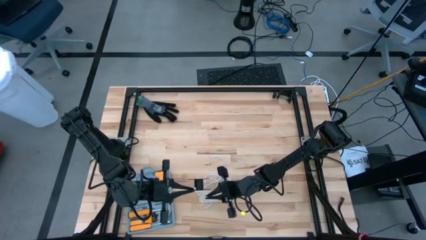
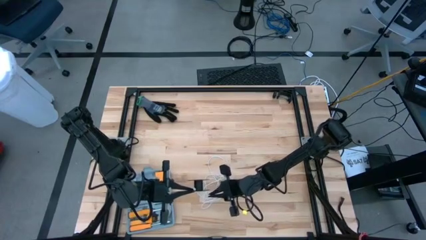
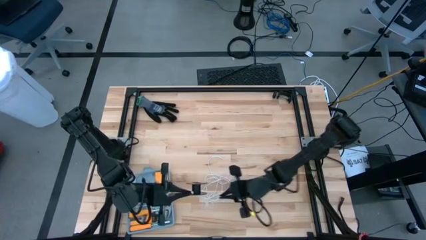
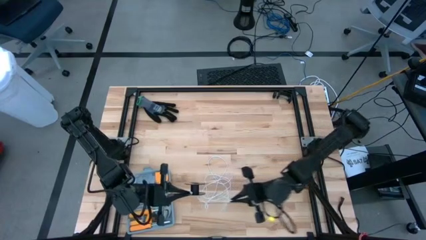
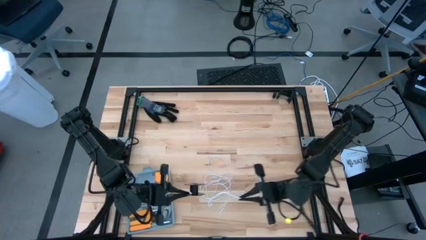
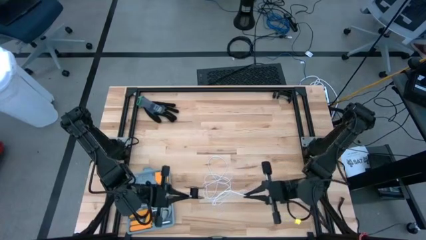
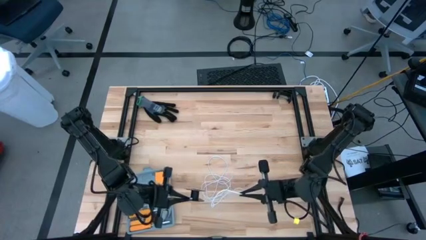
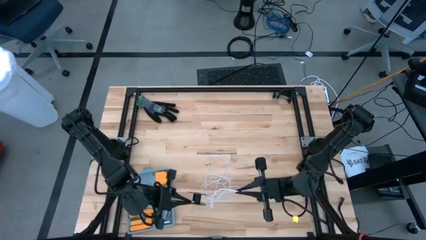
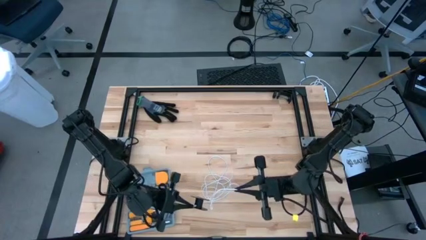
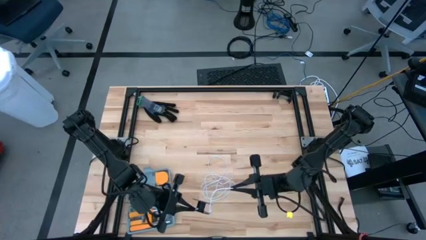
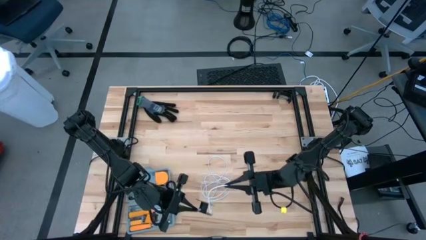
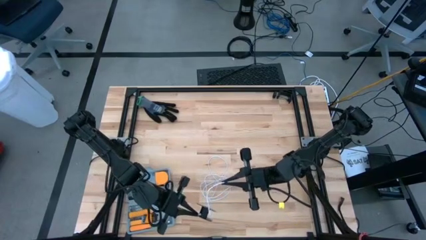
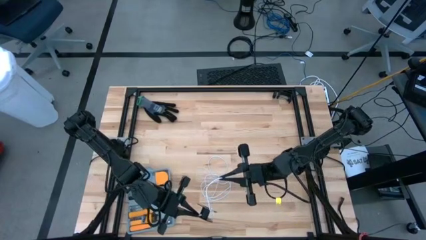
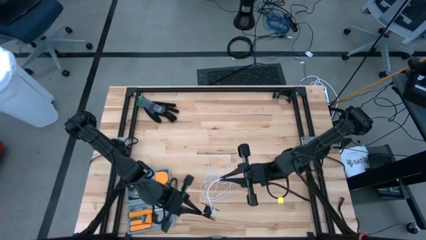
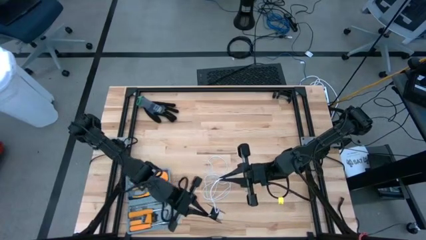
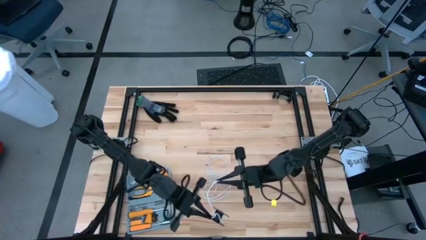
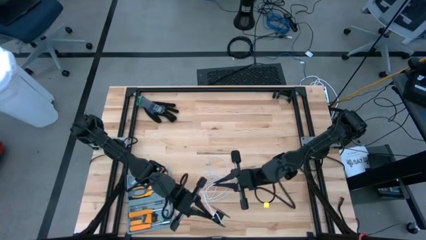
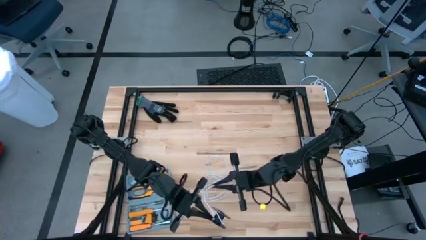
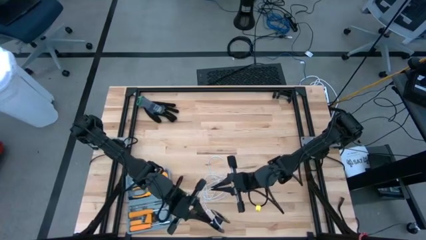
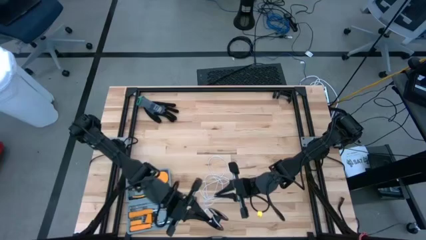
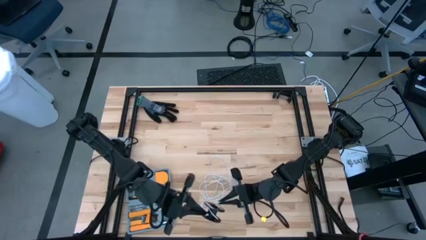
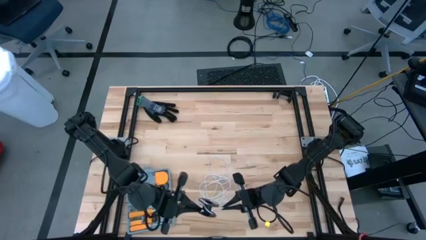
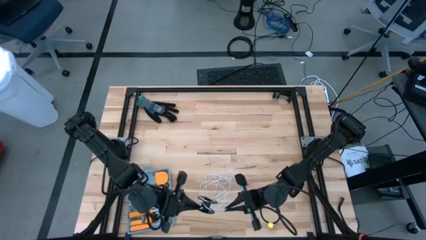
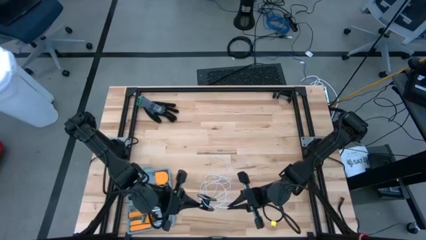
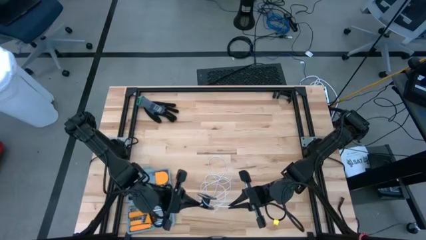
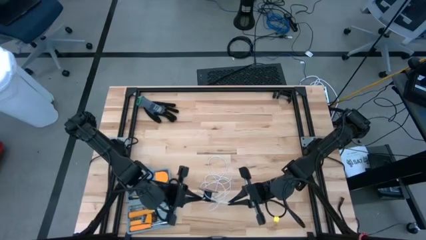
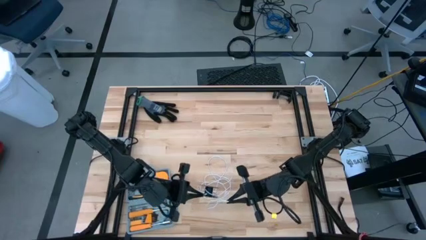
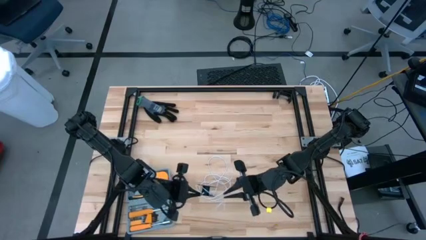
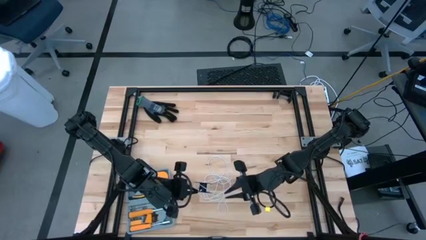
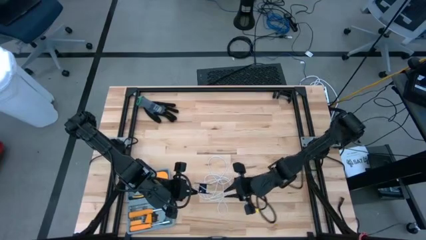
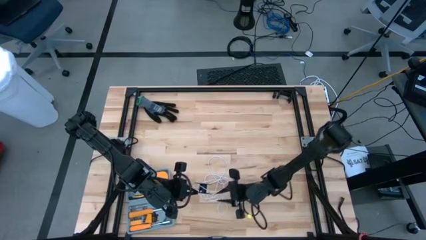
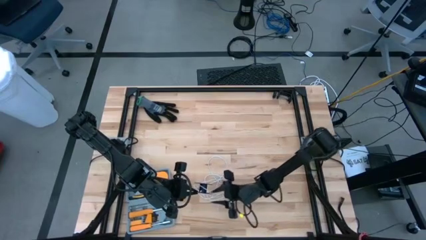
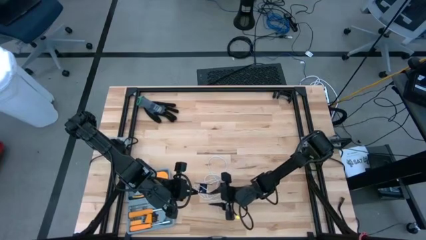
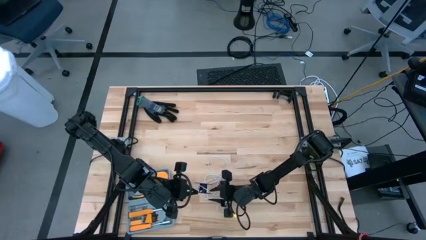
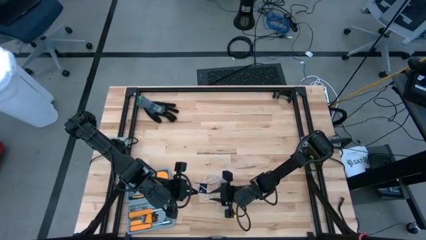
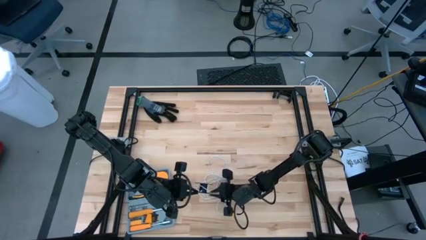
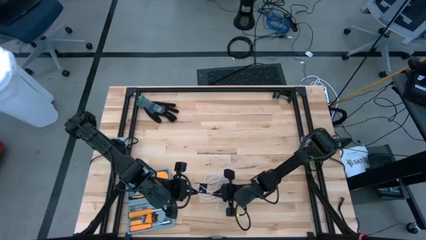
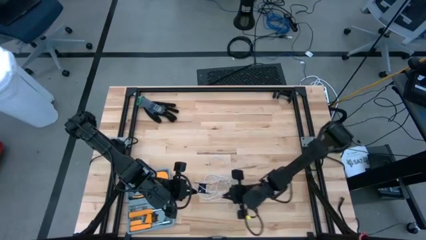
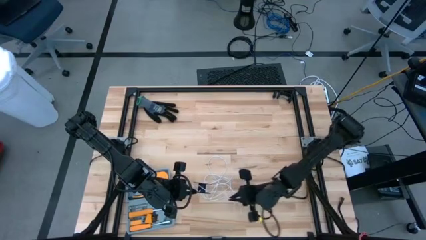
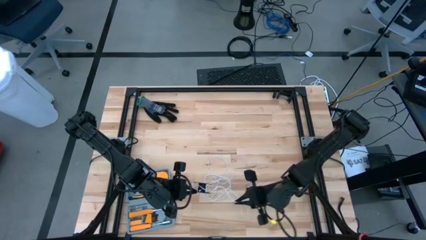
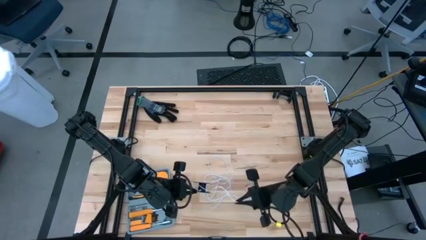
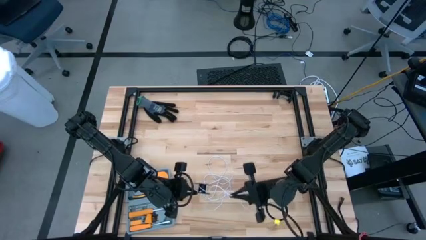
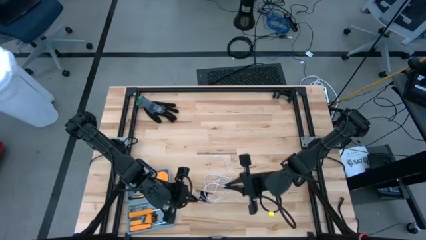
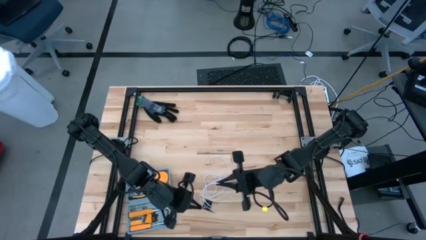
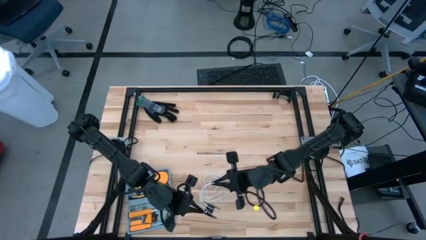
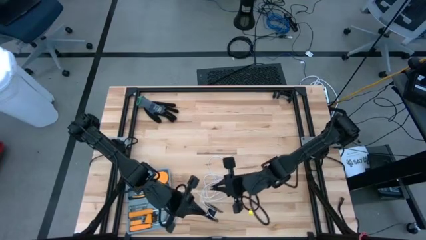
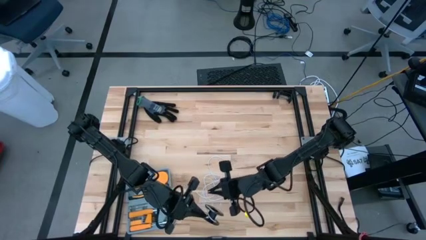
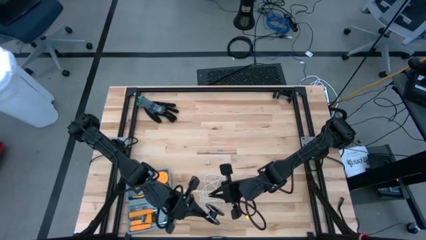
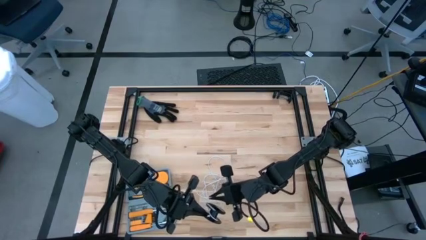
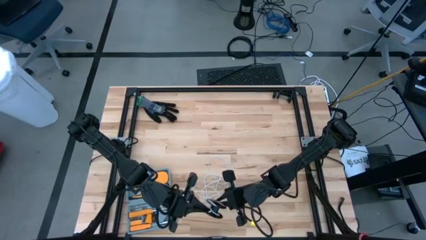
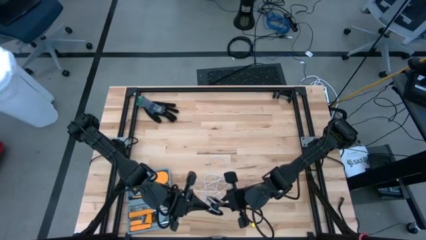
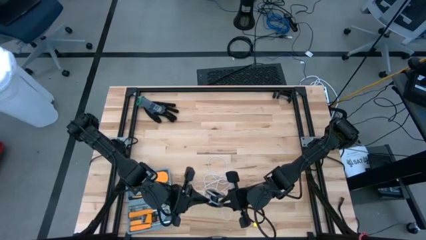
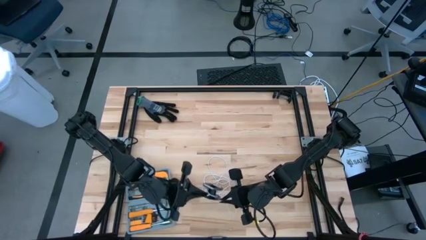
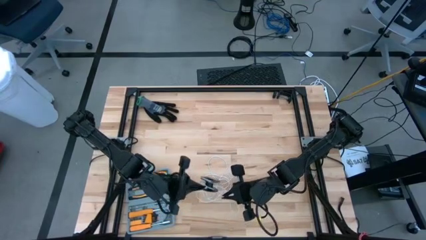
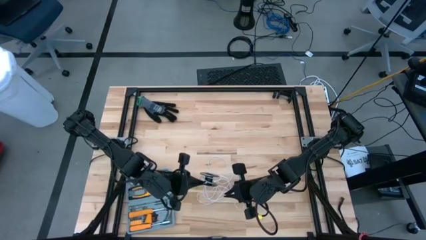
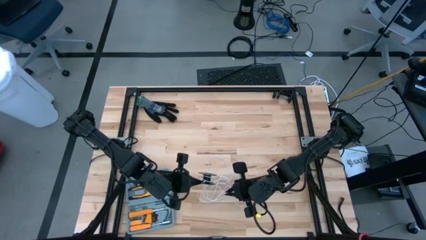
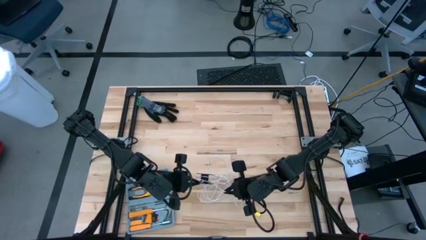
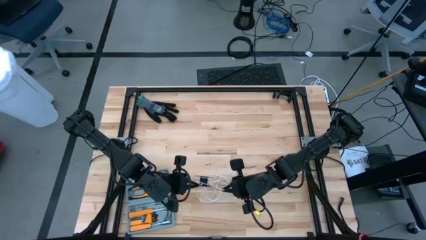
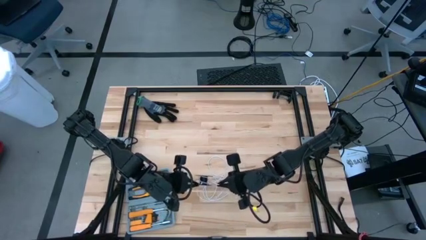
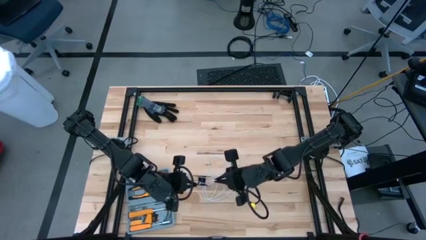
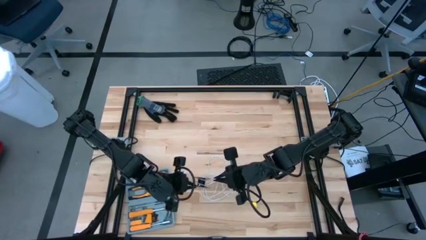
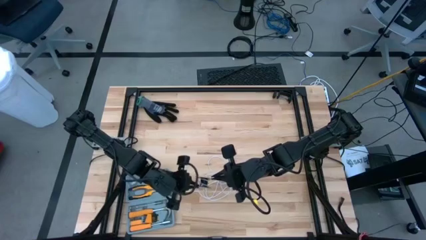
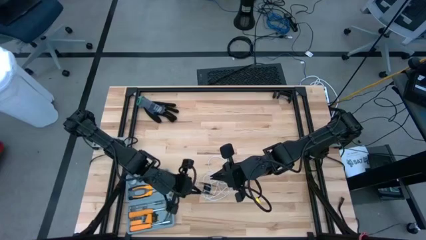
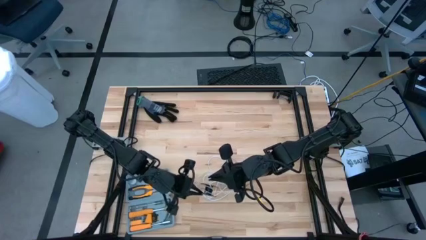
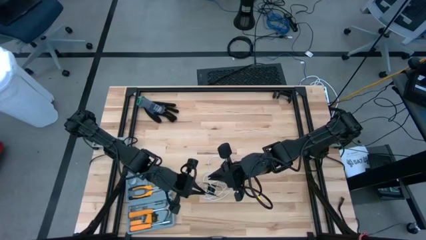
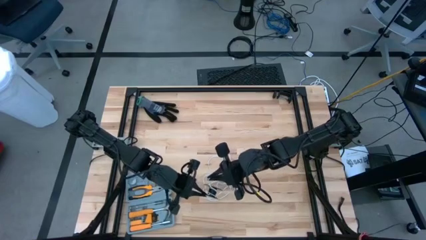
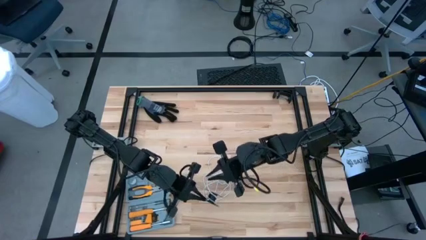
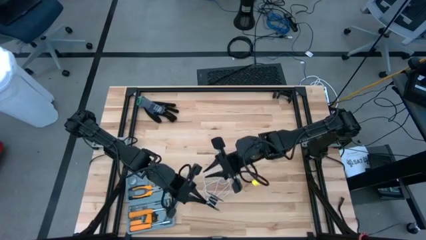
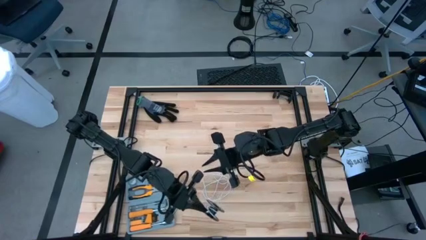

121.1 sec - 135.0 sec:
Task: Coil cords
Coil the white cable wire into the spool

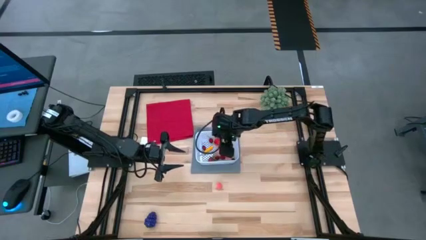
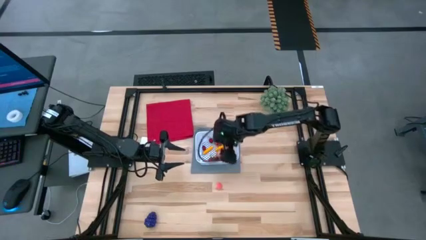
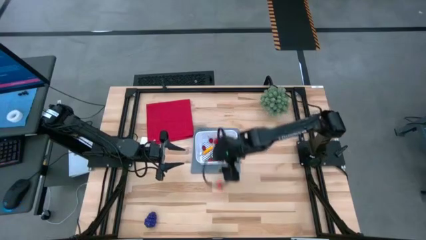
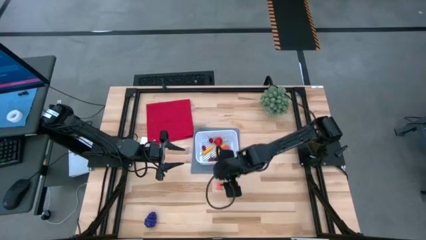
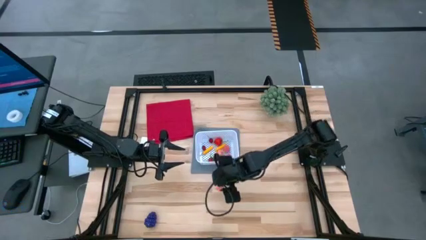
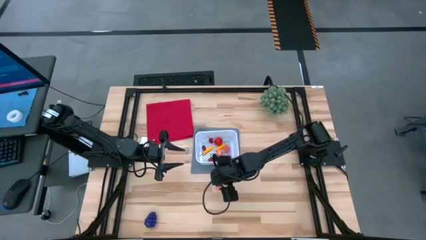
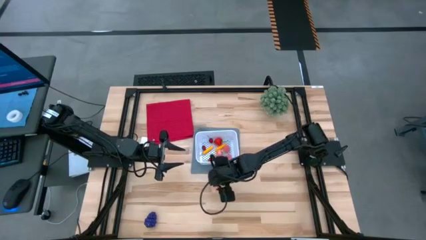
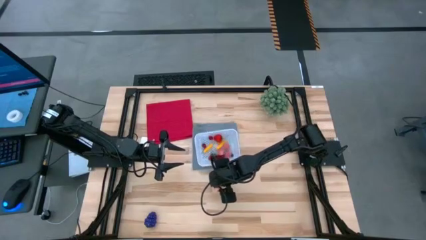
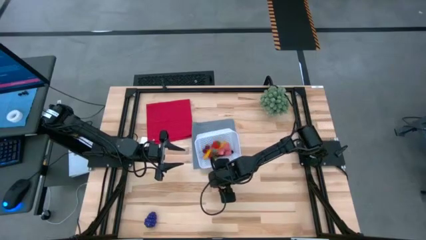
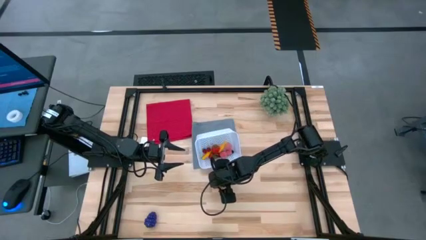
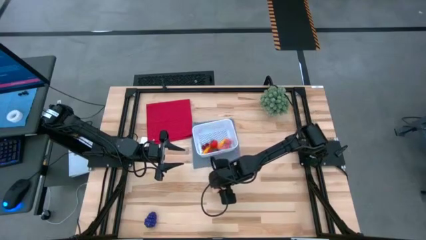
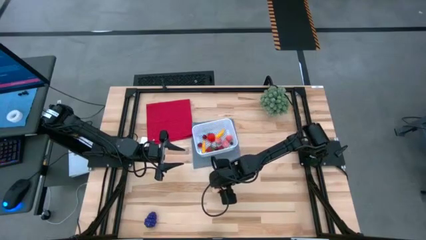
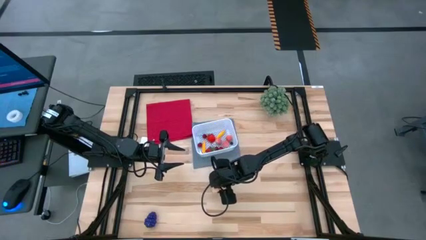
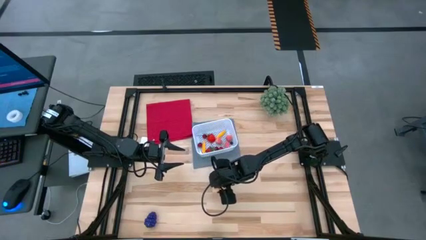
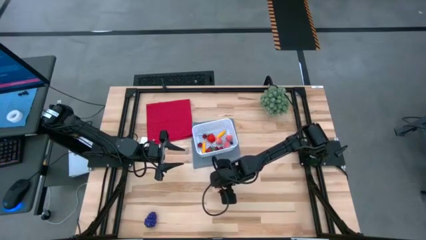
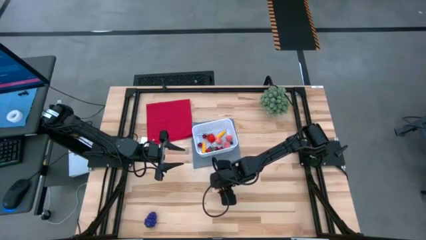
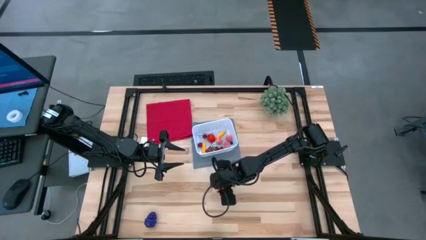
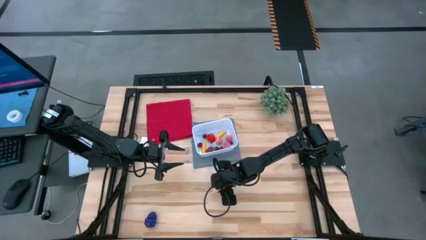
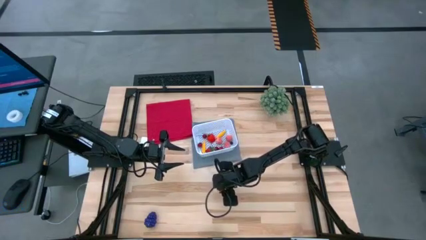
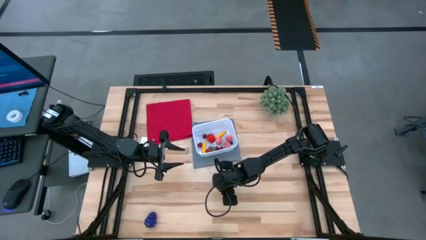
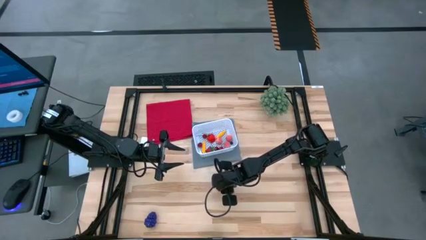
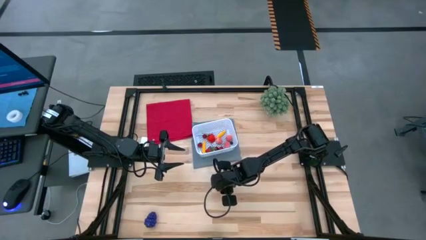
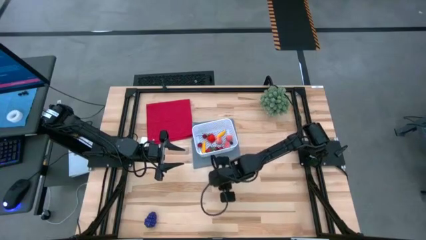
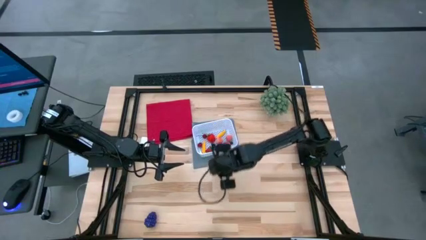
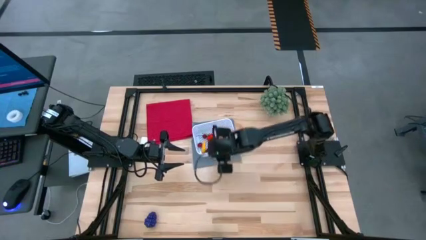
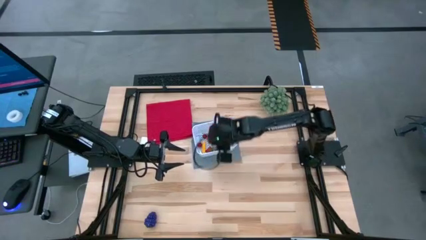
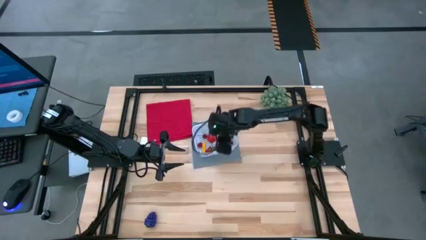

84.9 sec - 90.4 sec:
Task: Pick and placing Produce into tupperware
Put the peach into the white basket
